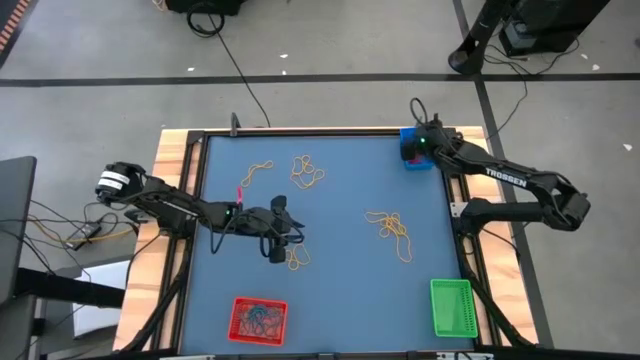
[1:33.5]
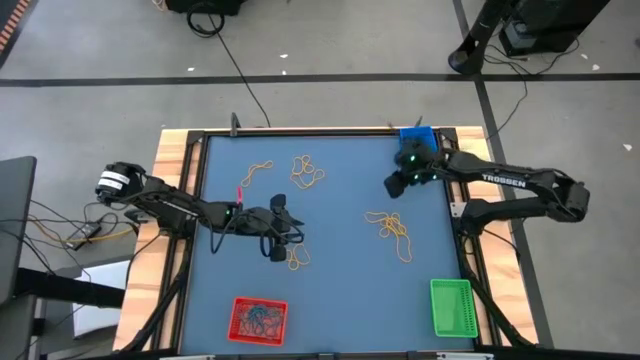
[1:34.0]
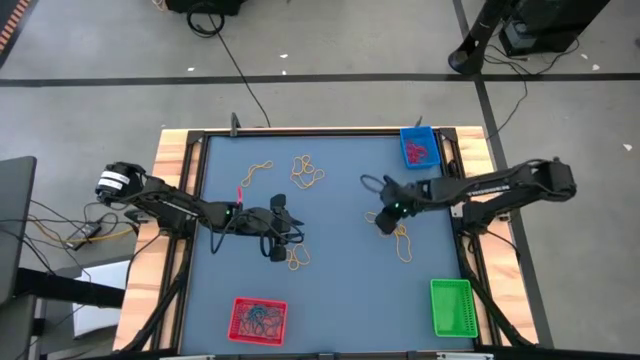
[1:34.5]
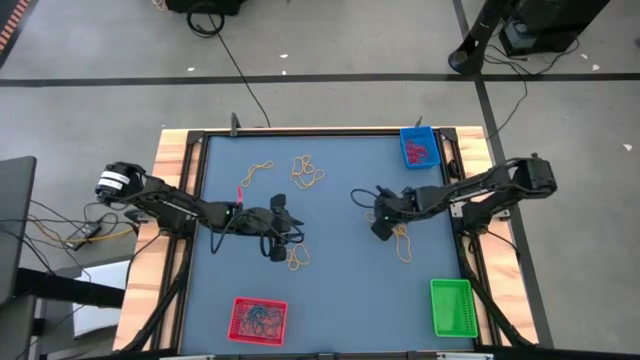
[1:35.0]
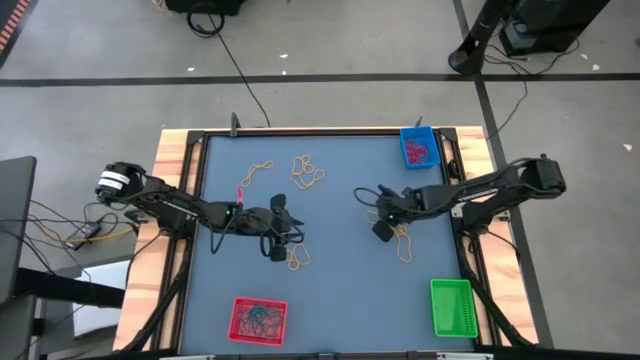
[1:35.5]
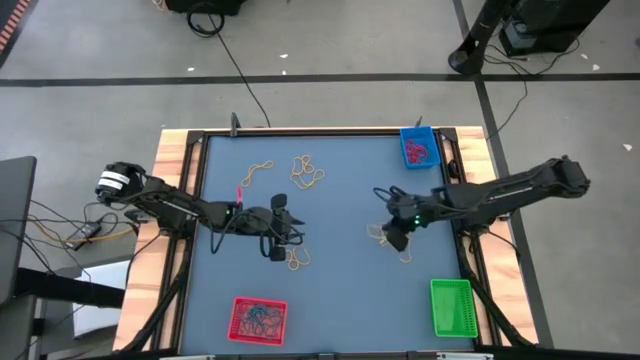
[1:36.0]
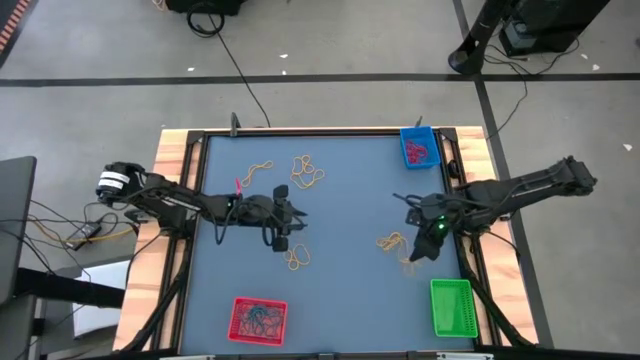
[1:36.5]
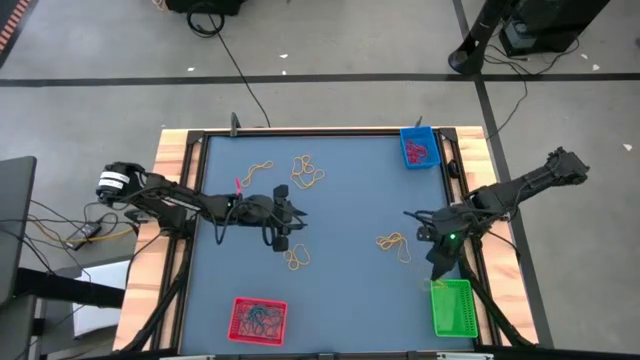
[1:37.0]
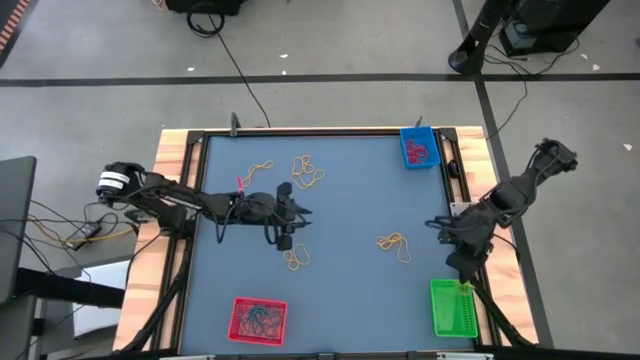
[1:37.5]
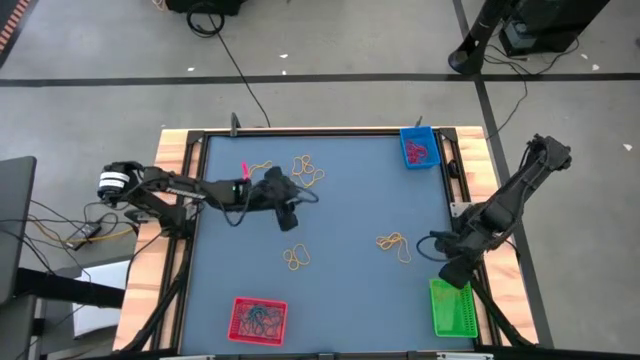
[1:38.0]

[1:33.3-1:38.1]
Task: Sort rubber bands into baskets
Put the yellow rubber band into the green bin

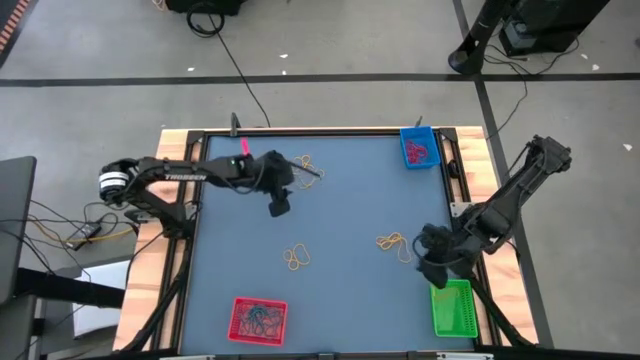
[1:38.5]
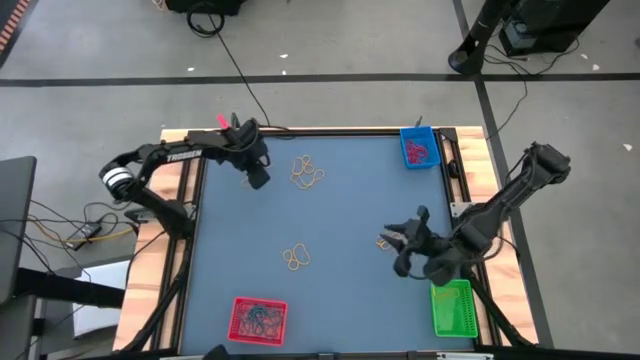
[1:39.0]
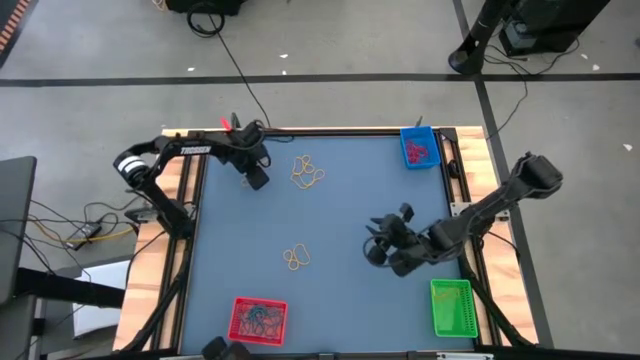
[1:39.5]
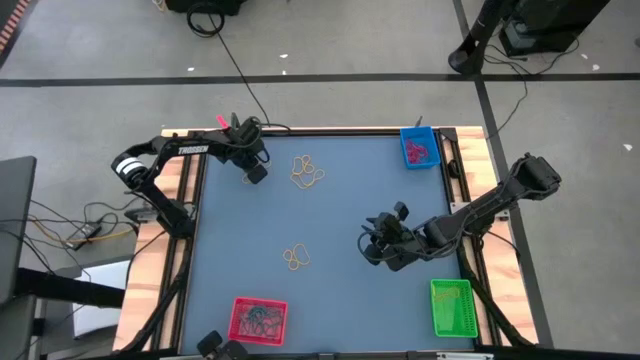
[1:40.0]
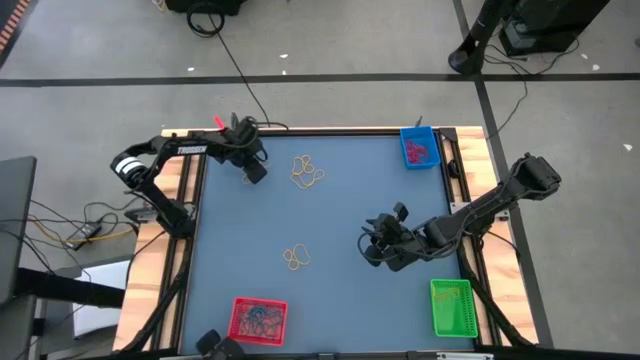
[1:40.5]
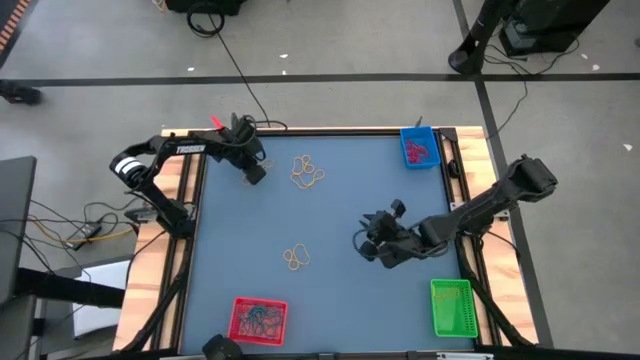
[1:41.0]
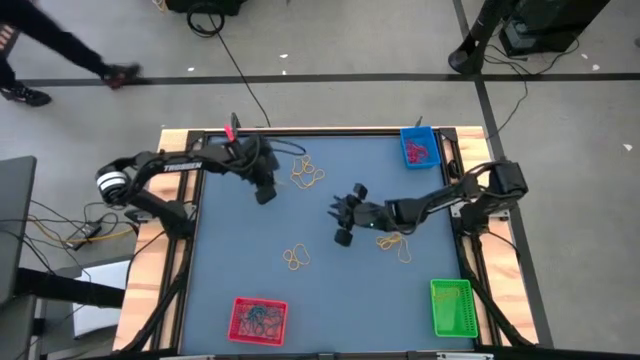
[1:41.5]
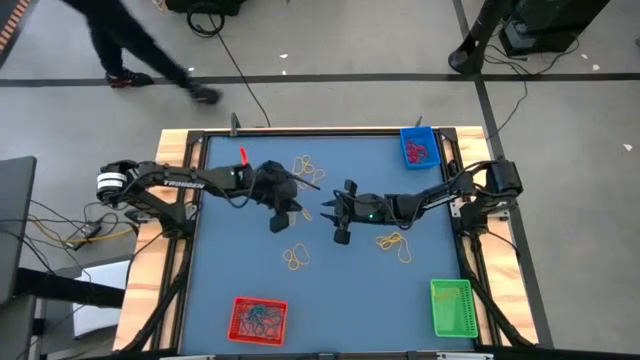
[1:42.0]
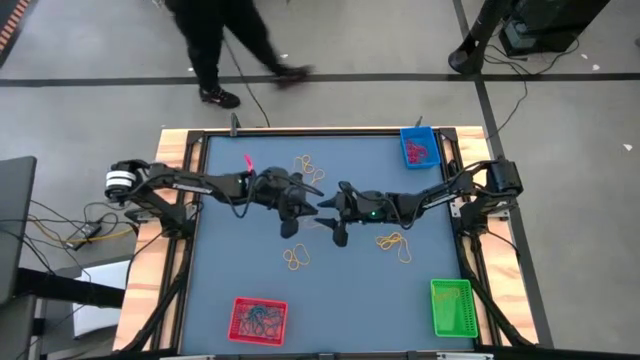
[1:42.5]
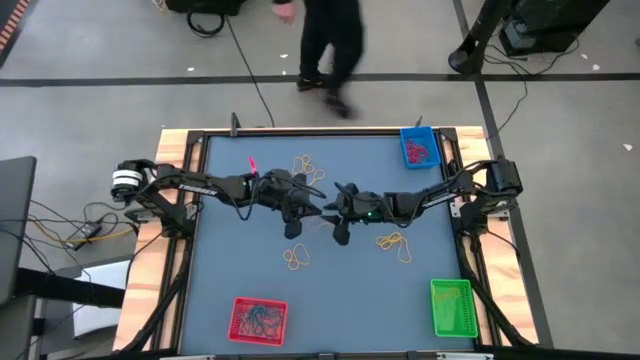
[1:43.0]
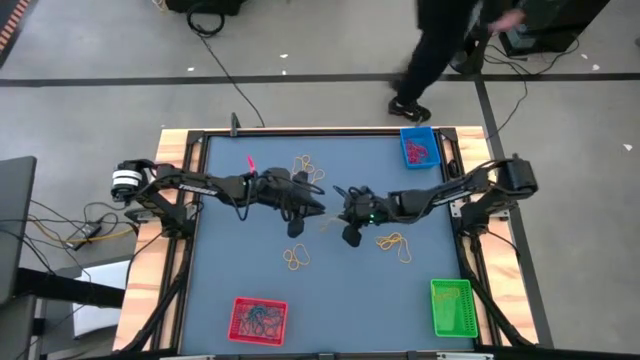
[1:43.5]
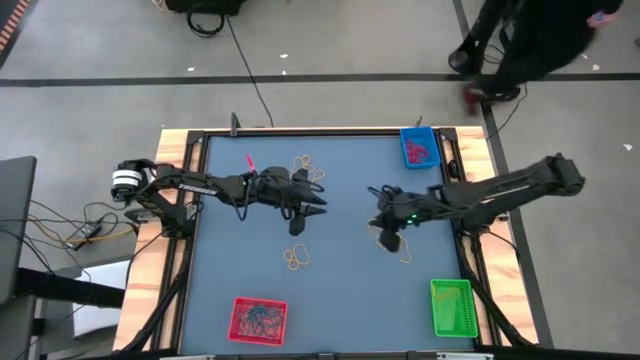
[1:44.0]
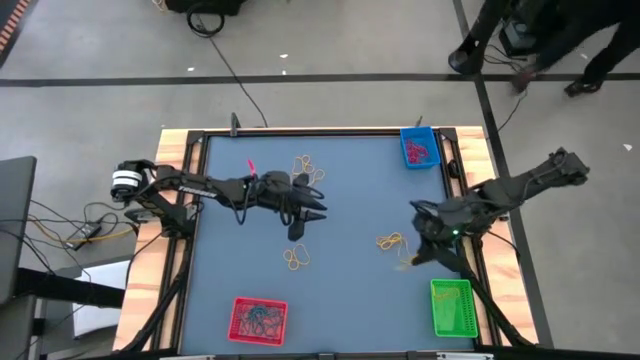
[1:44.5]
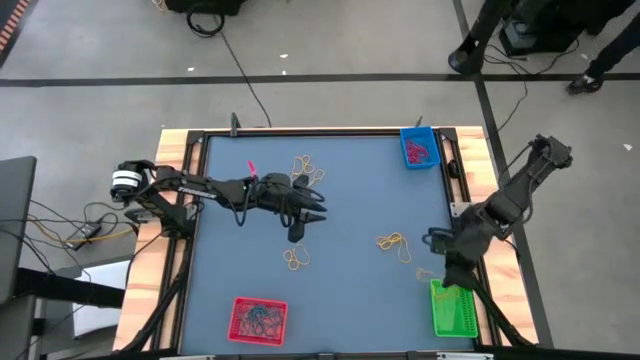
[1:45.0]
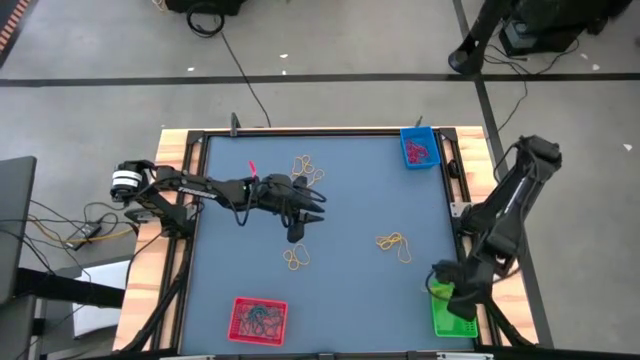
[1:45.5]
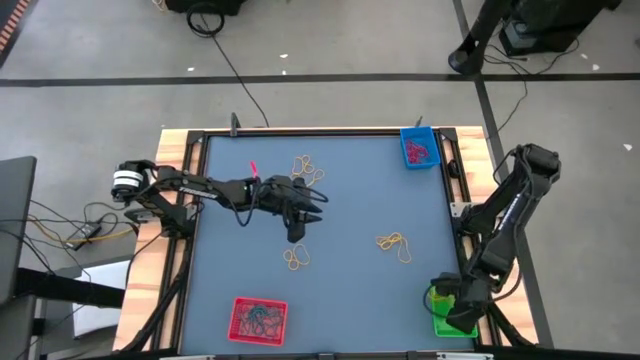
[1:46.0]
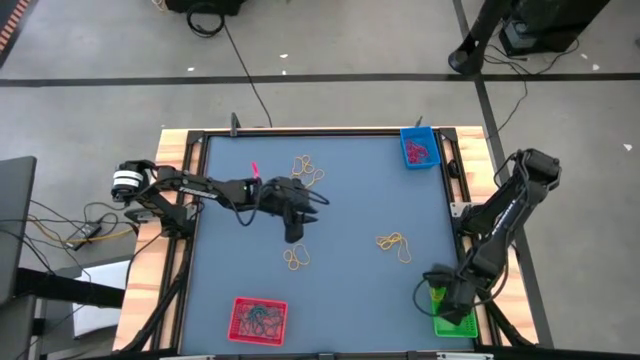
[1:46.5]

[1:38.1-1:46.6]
Put the yellow rubber band into the green bin

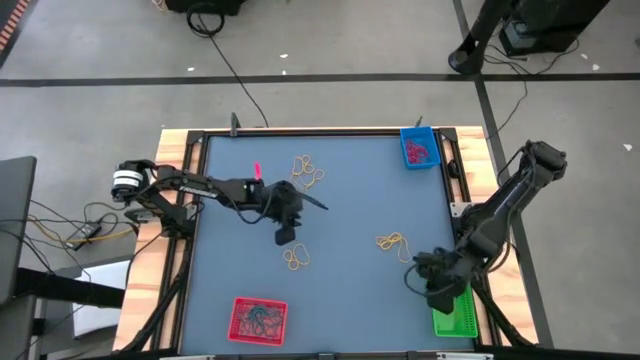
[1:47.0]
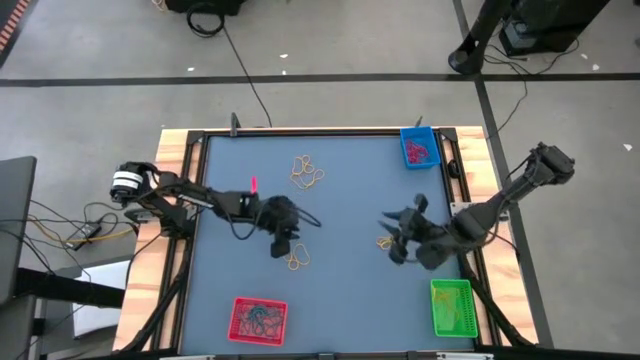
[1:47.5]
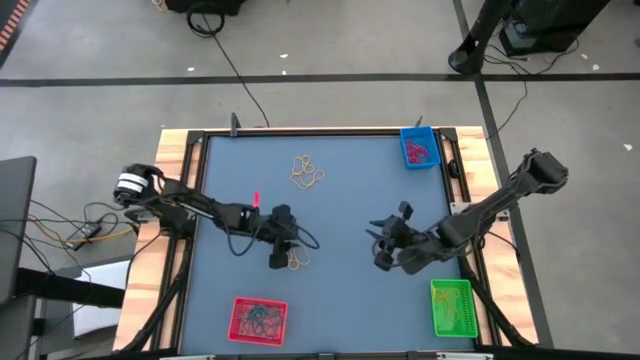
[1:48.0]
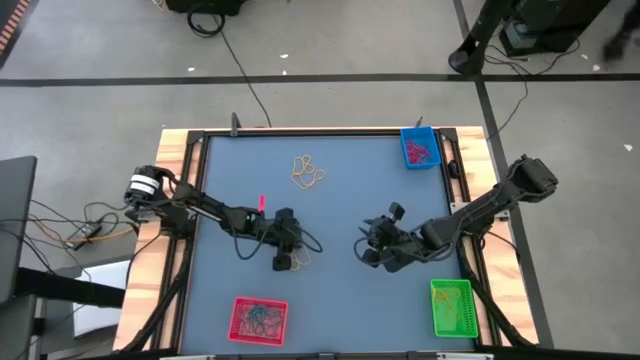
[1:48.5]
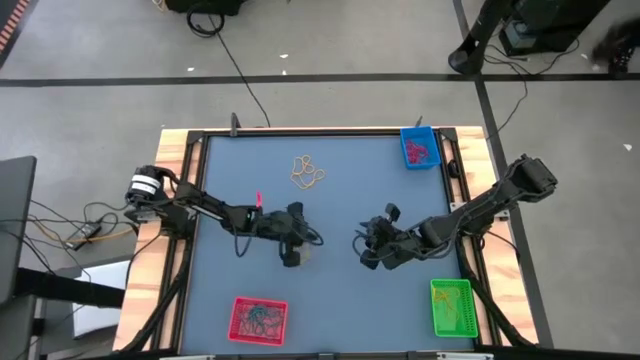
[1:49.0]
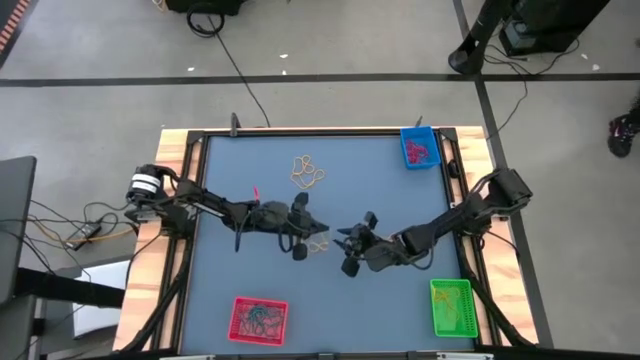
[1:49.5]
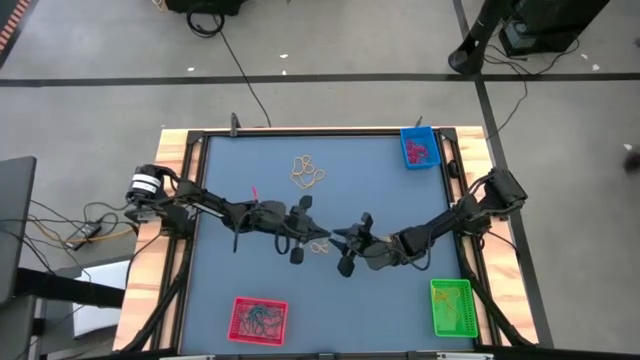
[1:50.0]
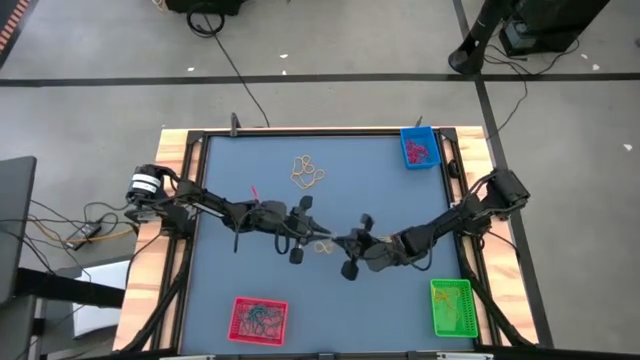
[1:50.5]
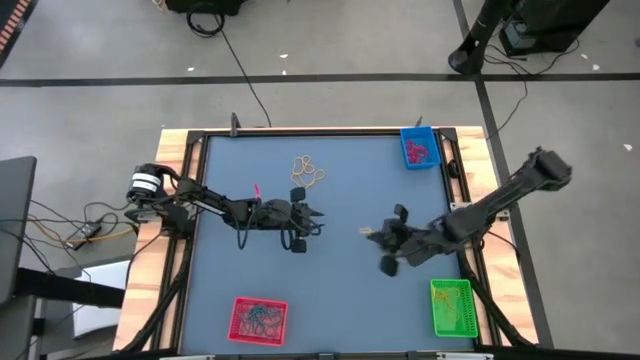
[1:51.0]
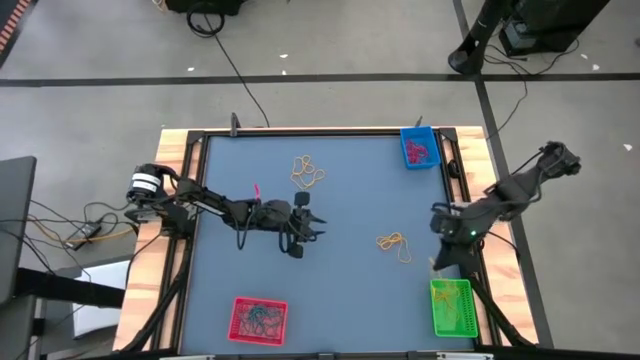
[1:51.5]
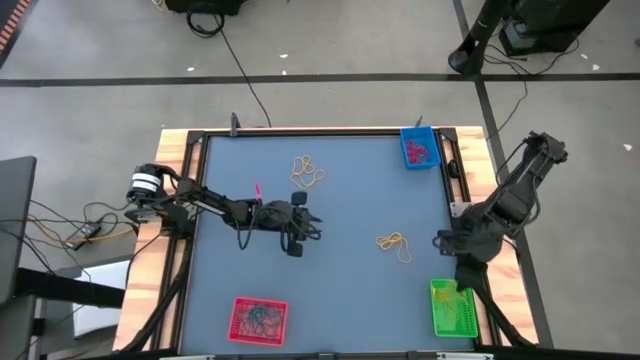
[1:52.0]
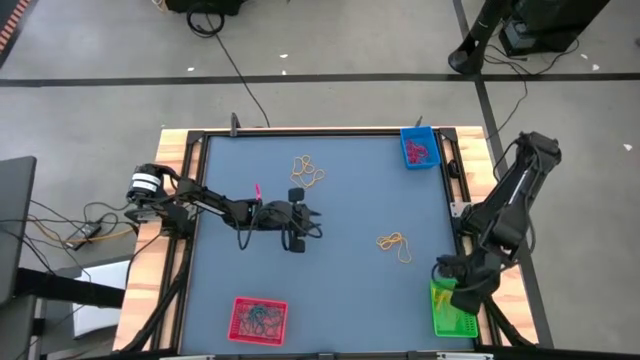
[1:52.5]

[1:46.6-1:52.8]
Put the yellow rubber band into the green bin

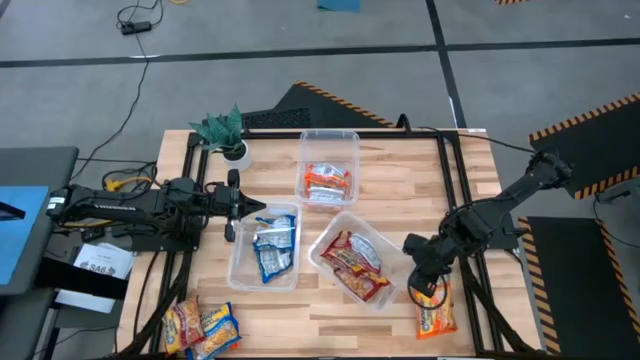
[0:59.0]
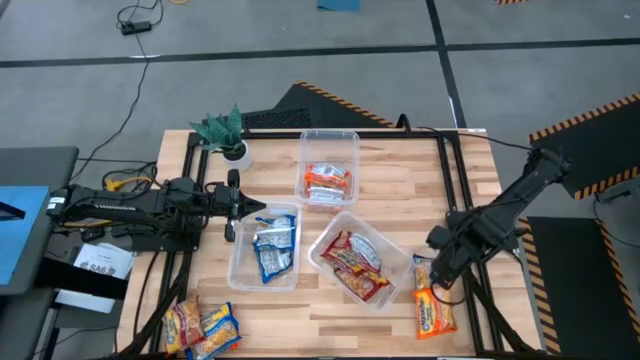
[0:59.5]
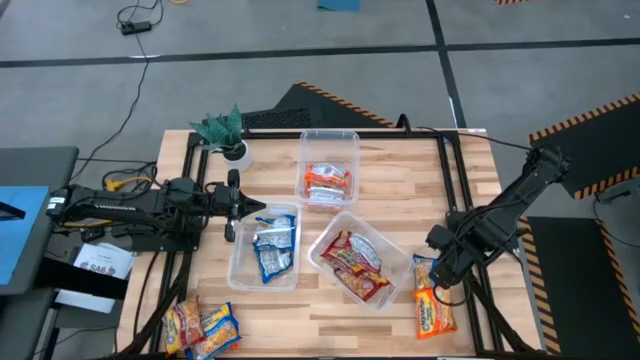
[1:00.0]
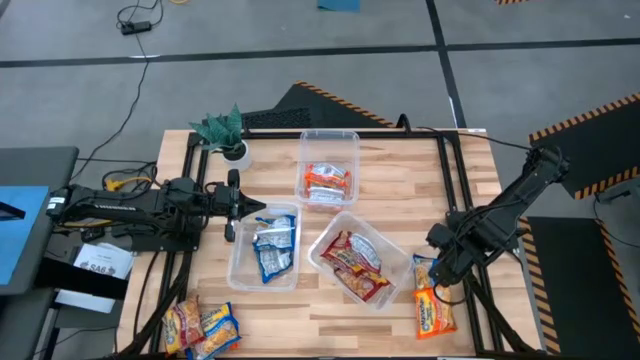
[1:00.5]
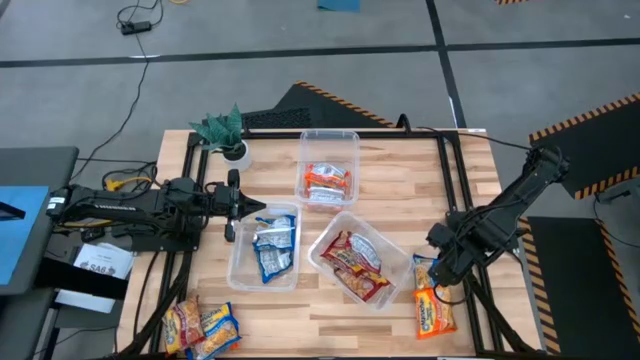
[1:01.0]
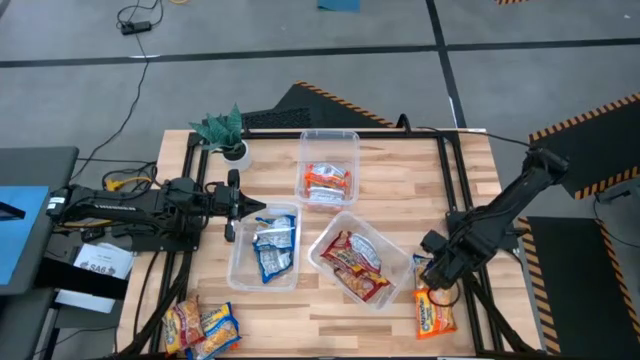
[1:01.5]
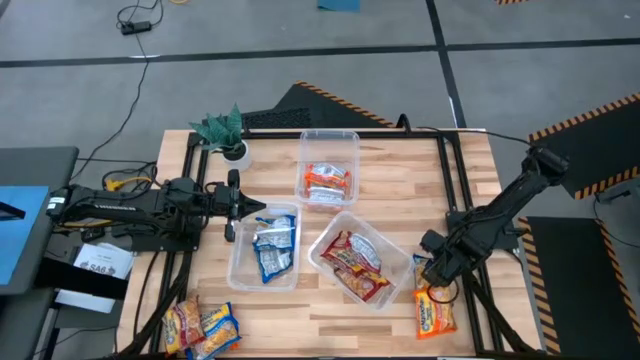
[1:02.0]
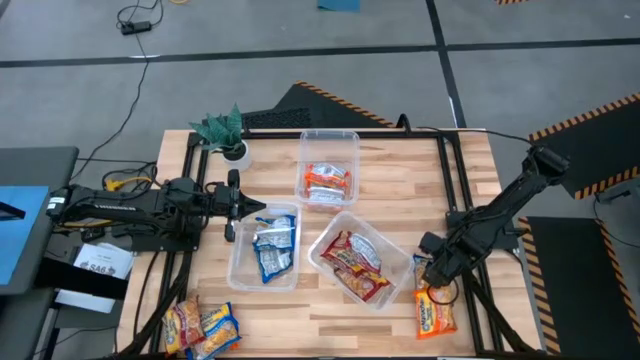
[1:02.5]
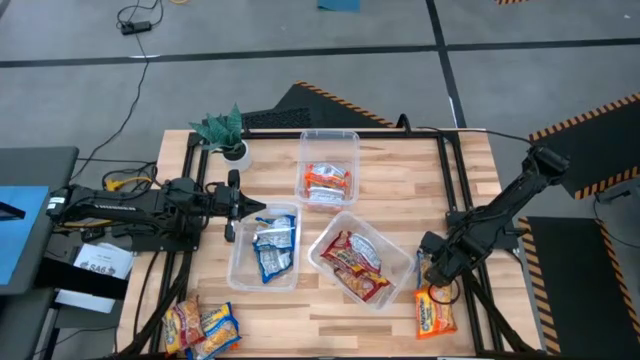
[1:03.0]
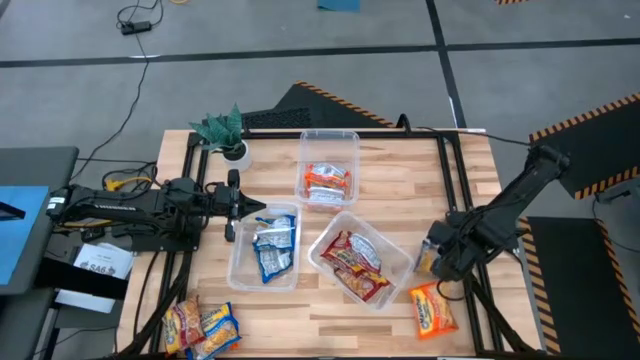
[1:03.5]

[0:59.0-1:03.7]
Task: Sort Maruchan noodles
Put the blue noodle pack in the bottom left transparent bin
